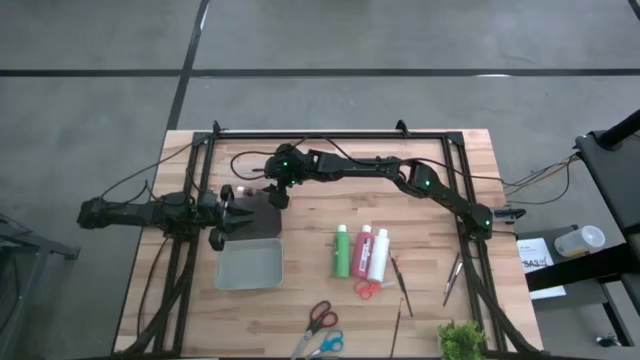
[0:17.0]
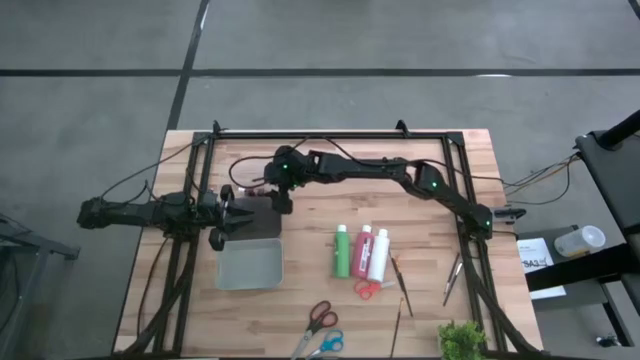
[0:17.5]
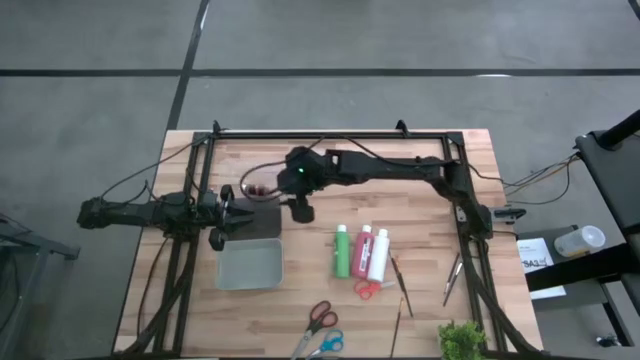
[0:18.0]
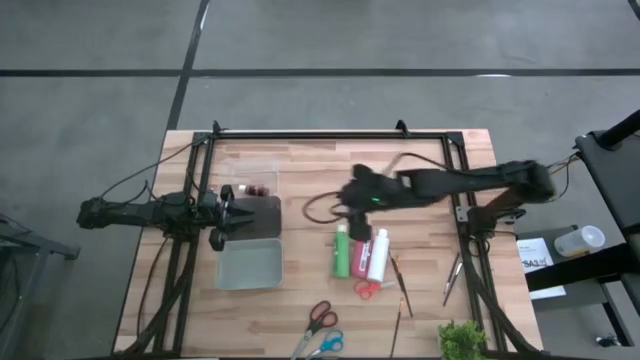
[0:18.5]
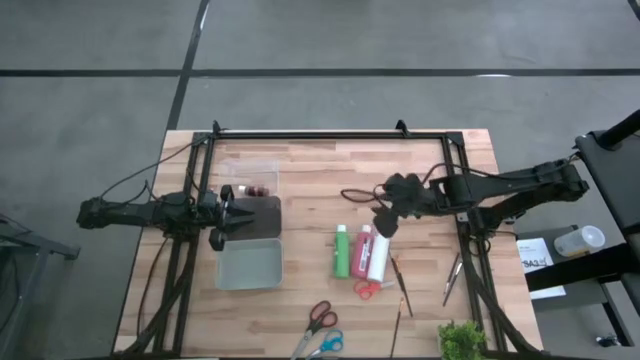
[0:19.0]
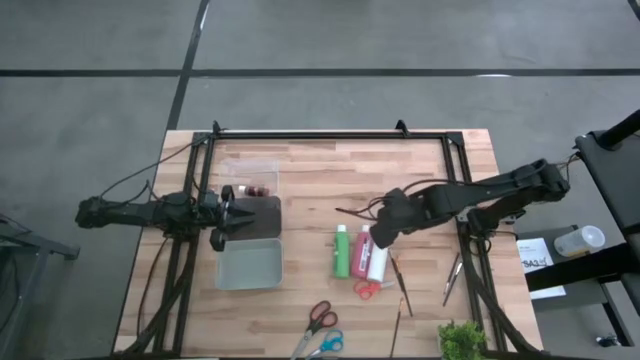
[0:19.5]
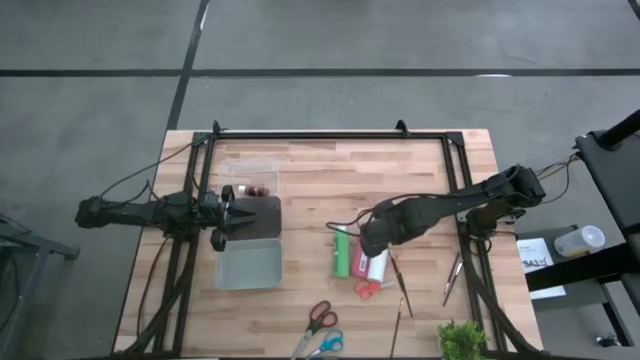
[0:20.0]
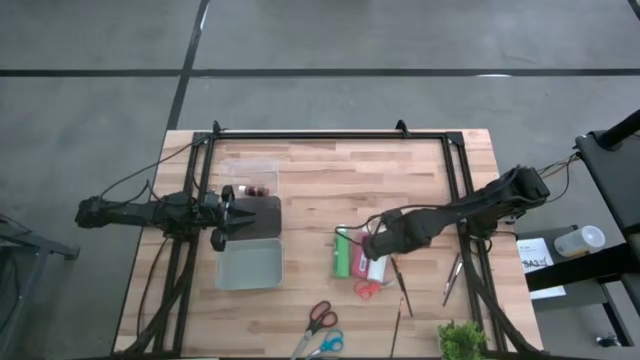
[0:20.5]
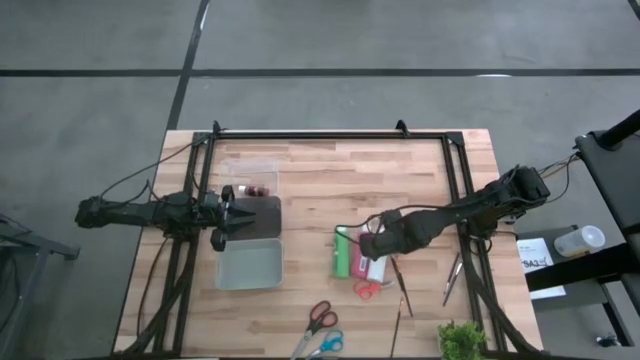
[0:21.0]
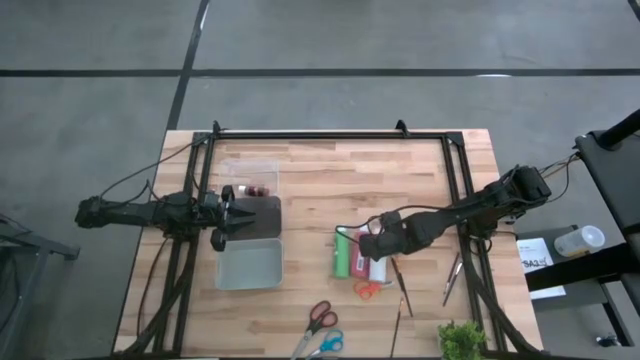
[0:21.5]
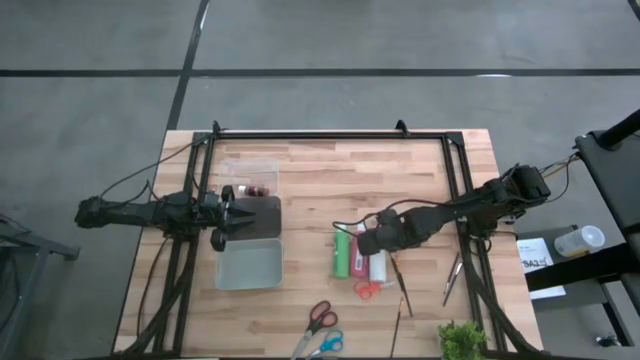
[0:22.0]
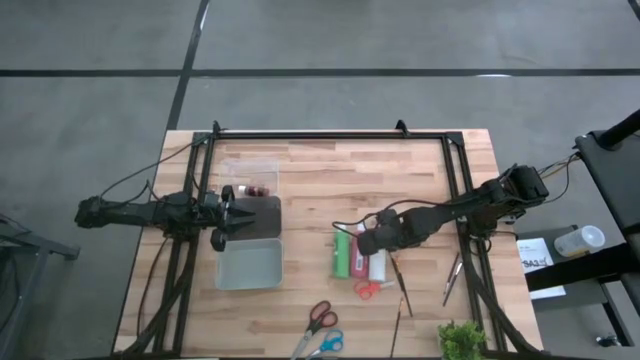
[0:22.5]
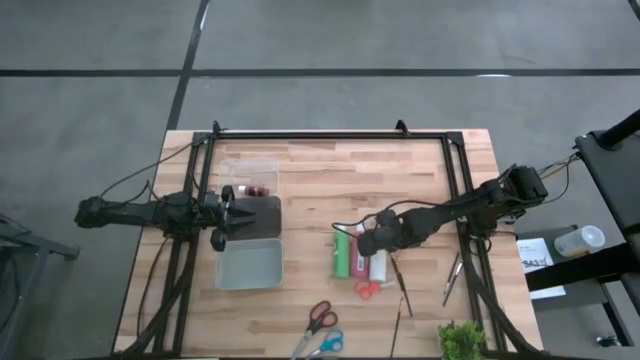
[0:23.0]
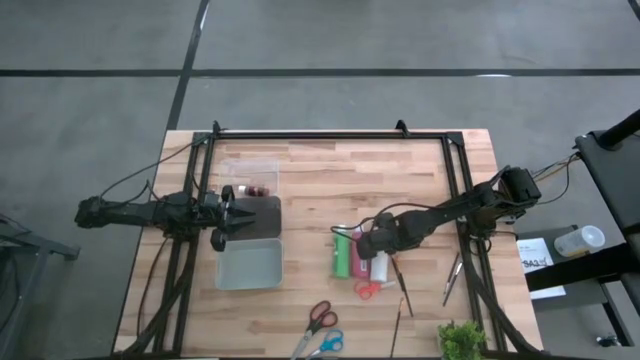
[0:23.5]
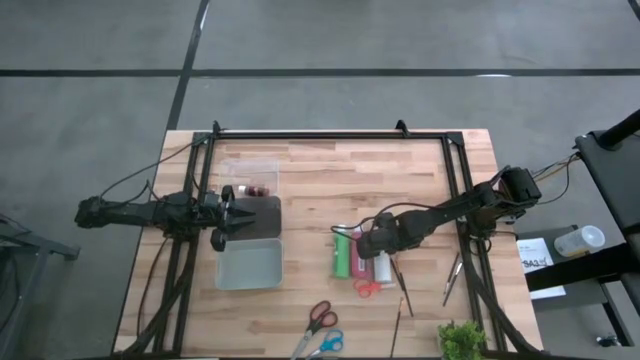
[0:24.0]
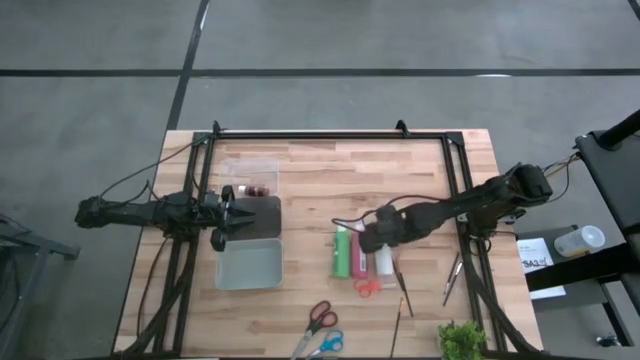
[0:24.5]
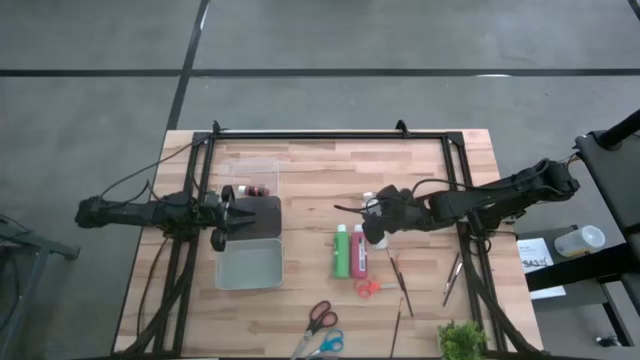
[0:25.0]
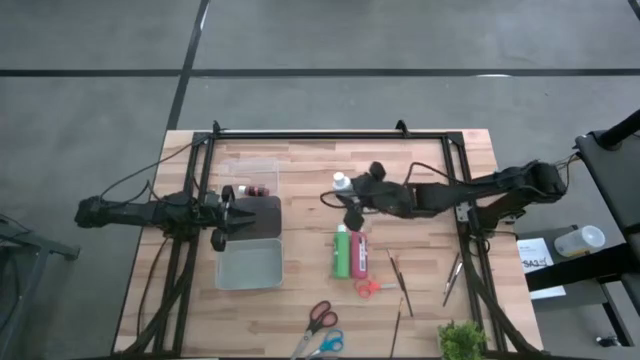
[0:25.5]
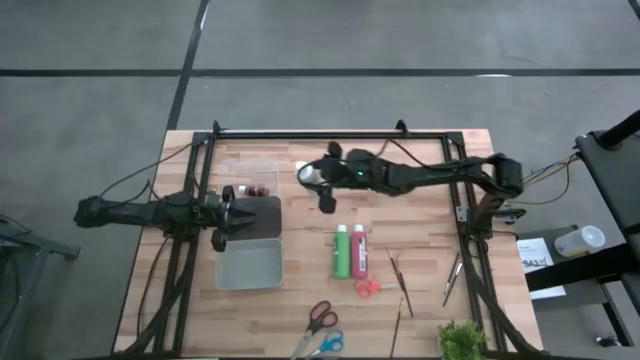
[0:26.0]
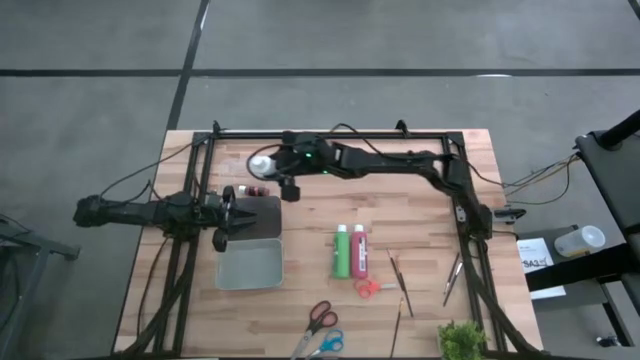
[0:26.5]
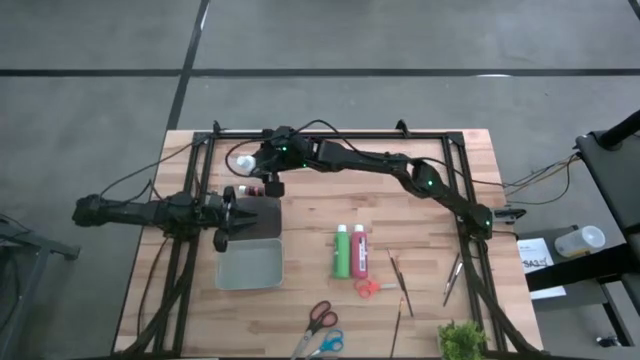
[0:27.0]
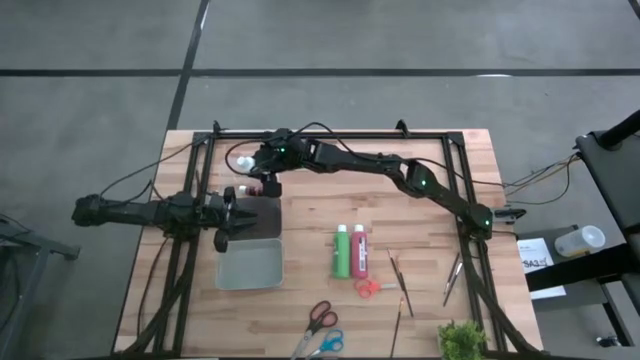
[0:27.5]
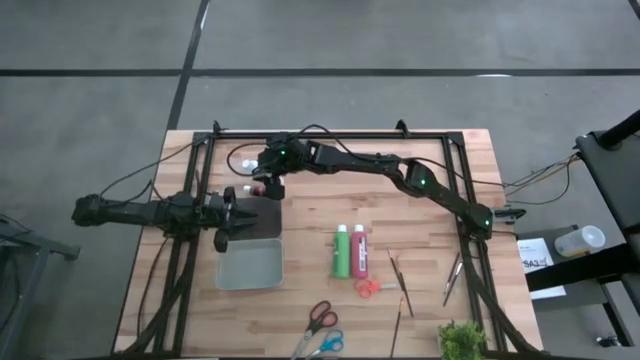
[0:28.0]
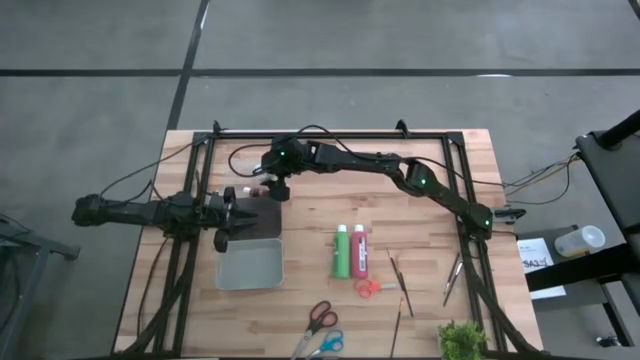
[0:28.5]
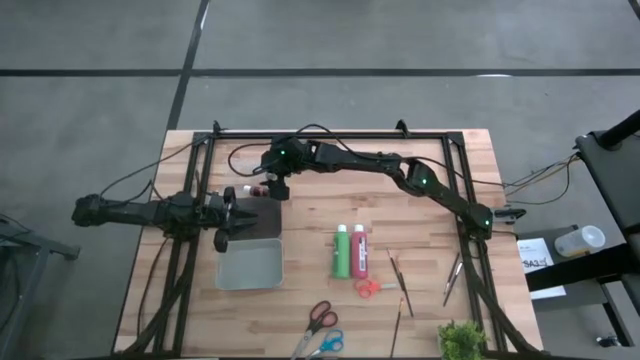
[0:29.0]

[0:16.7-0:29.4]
Task: Pick & Place Paint Supplies
Put the white paint bottle into the transparent bin

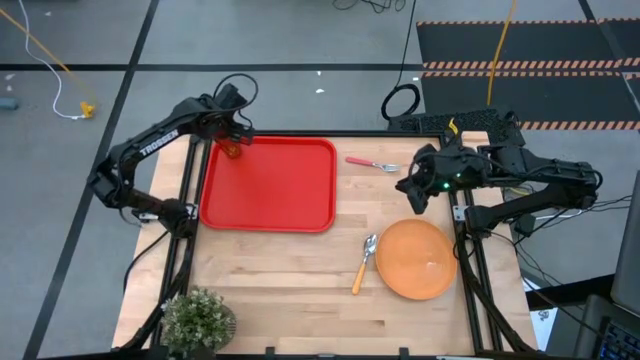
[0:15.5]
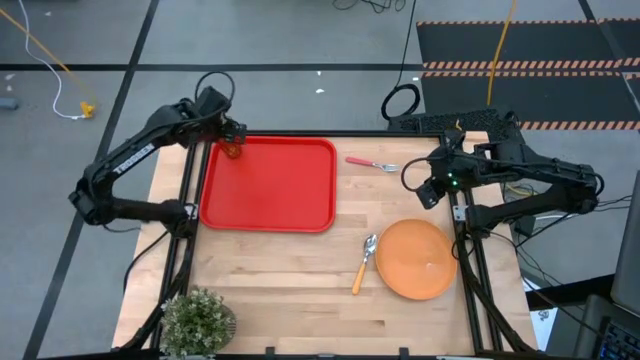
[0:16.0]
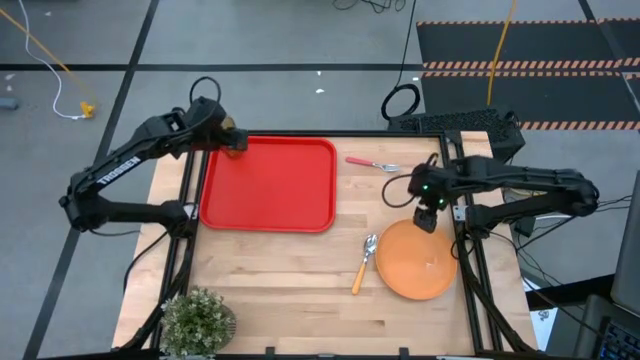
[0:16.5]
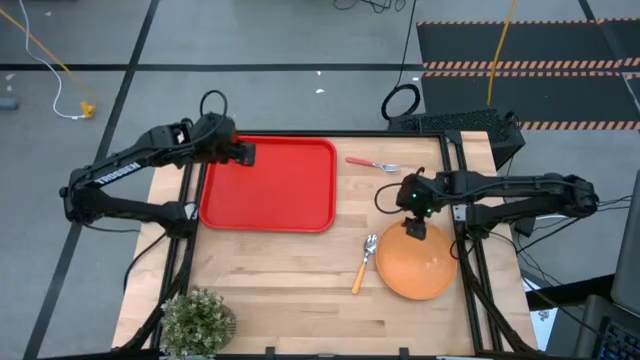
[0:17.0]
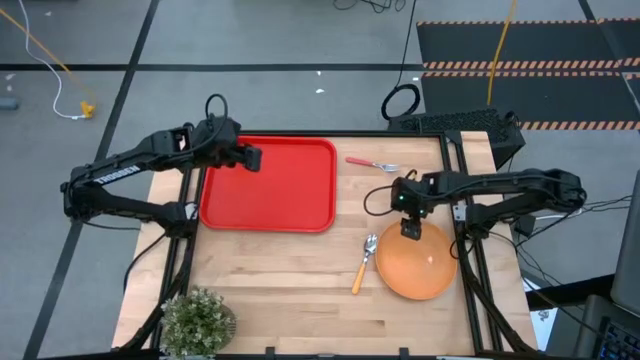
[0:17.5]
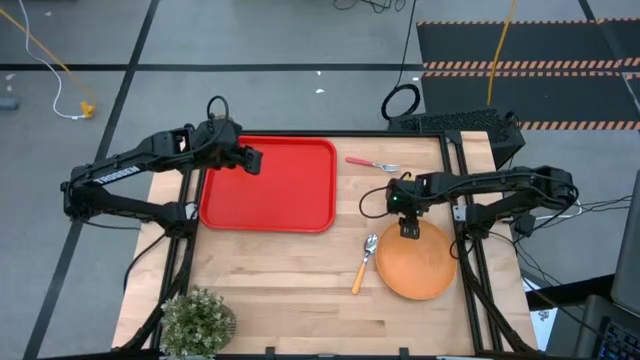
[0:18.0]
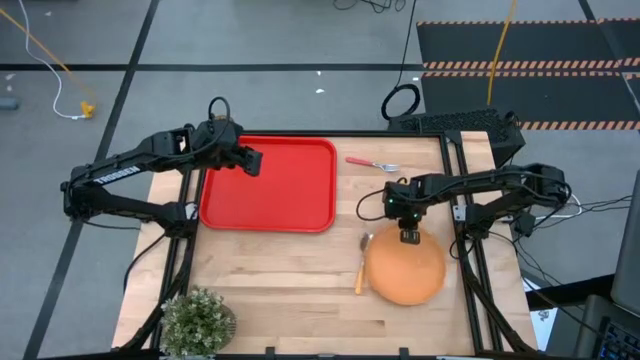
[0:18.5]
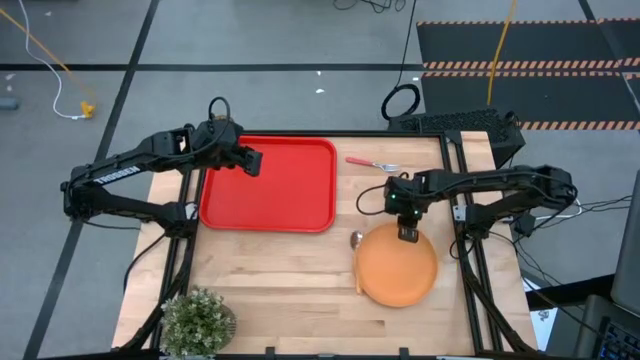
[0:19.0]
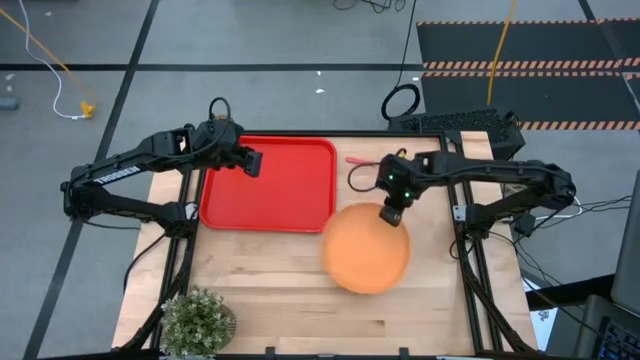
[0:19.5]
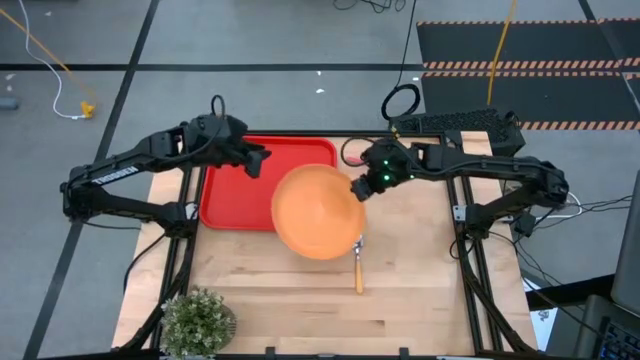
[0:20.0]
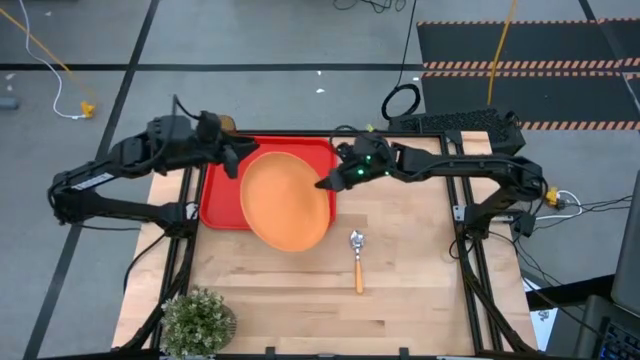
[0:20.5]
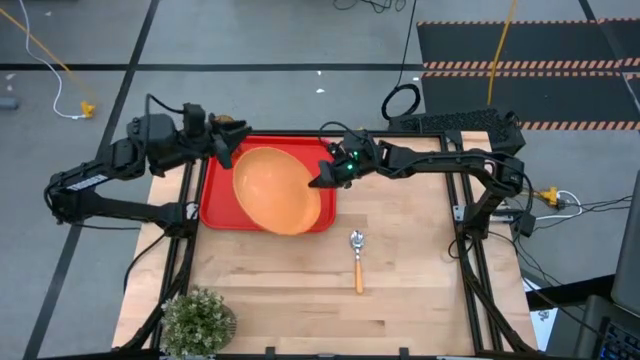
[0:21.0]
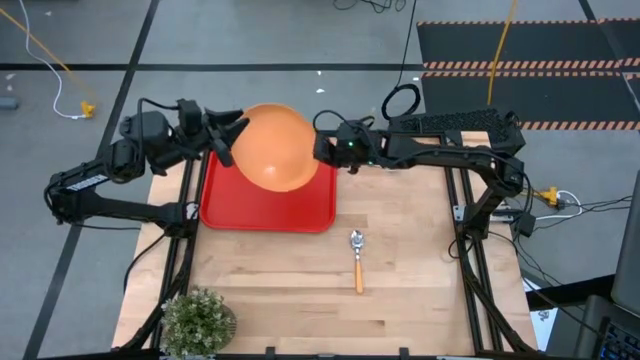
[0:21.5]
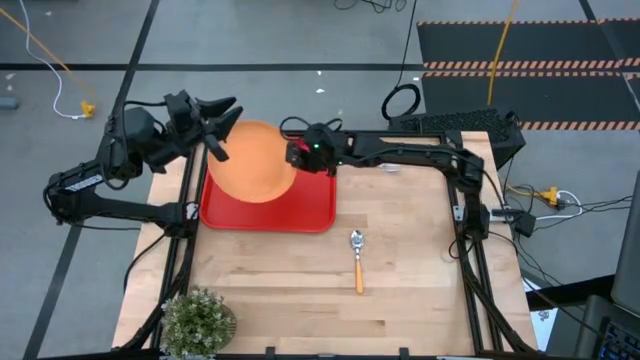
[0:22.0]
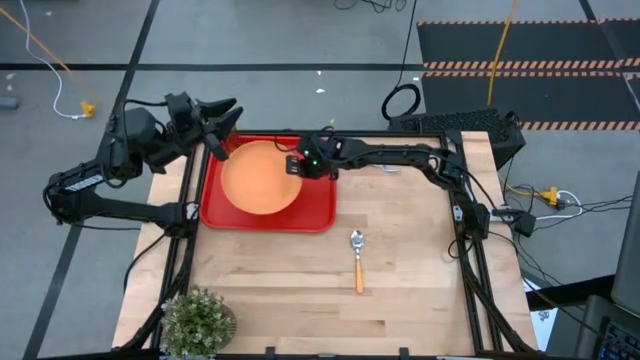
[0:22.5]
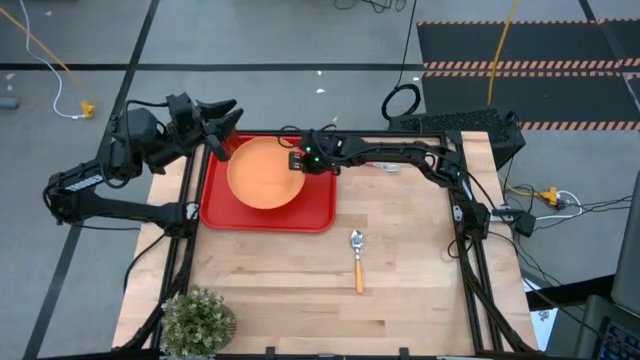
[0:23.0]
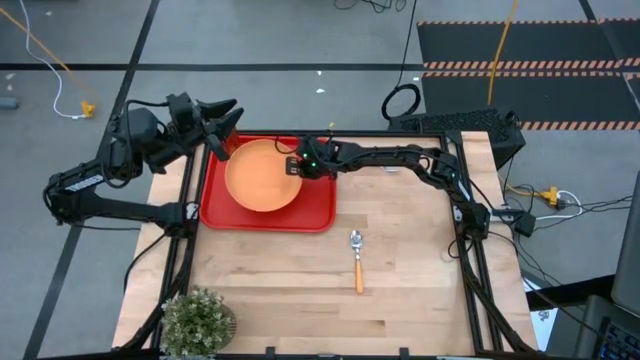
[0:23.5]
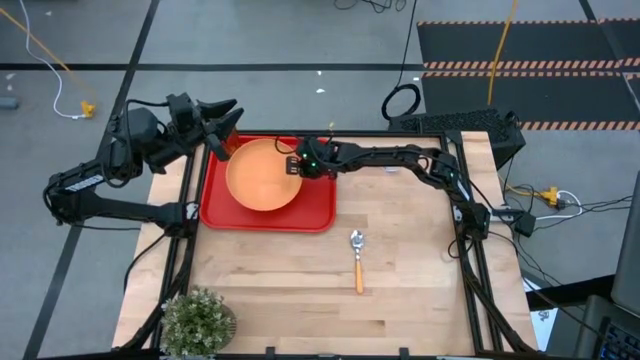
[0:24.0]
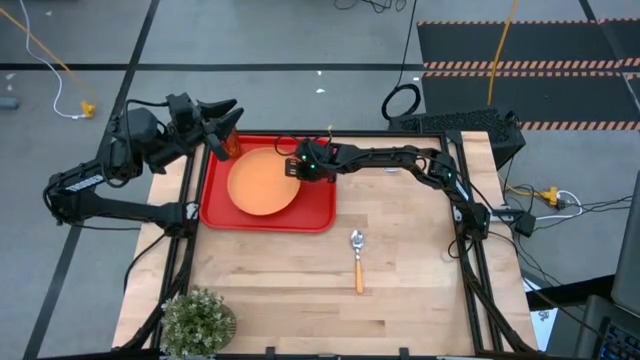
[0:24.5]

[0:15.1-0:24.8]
Task: Pick and place plate/cup/fork/spoon on tray
Put the orange plate on the red serving tray to the bottom right of the brown cup
